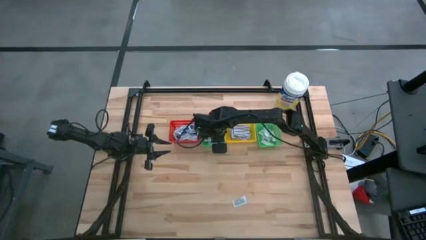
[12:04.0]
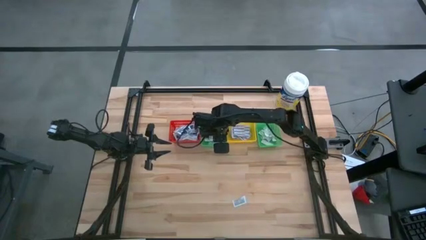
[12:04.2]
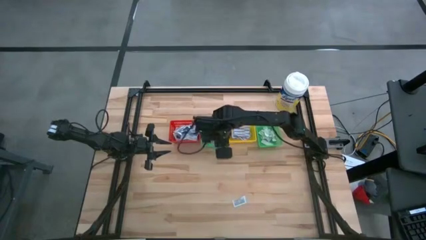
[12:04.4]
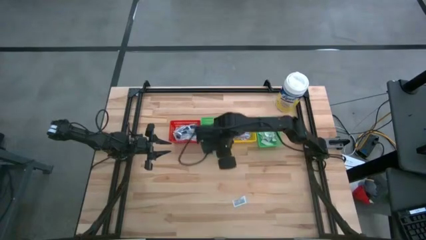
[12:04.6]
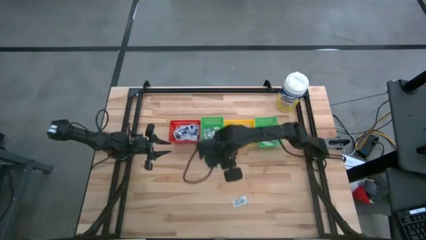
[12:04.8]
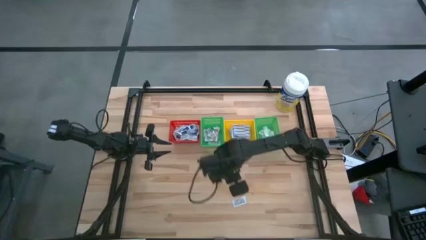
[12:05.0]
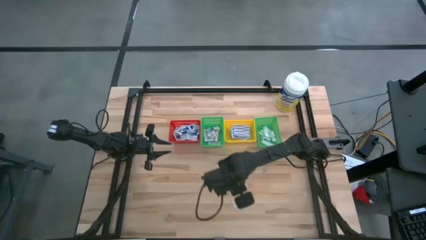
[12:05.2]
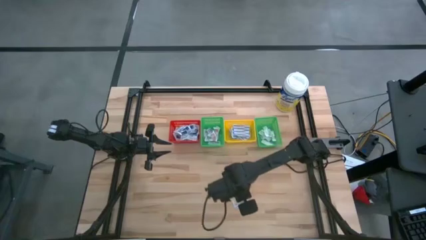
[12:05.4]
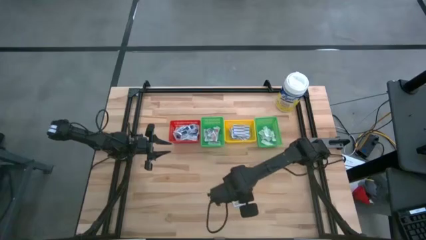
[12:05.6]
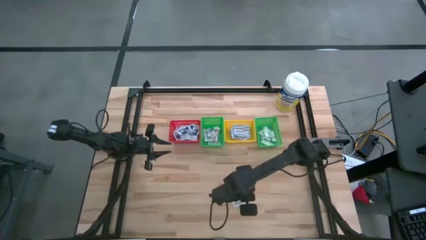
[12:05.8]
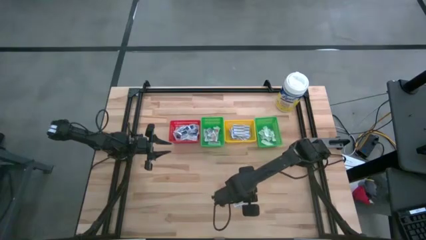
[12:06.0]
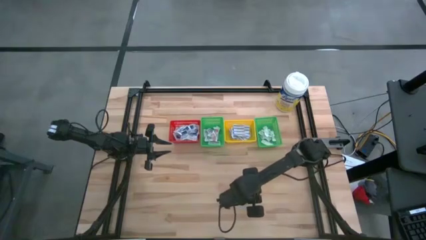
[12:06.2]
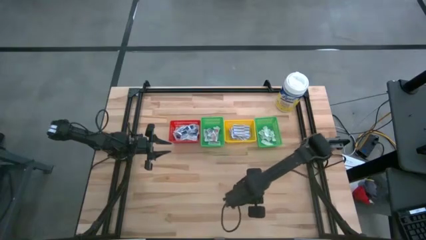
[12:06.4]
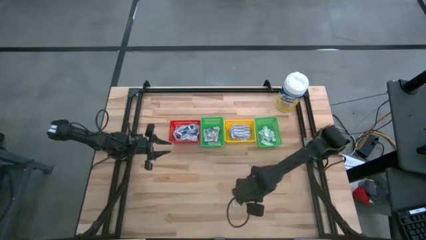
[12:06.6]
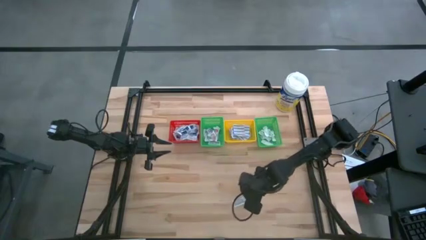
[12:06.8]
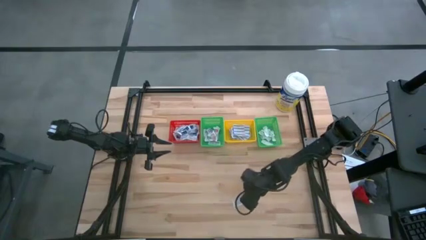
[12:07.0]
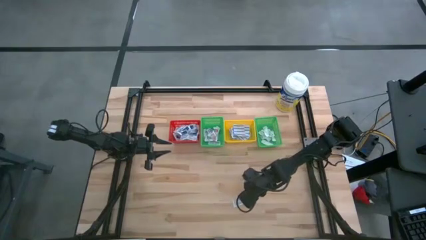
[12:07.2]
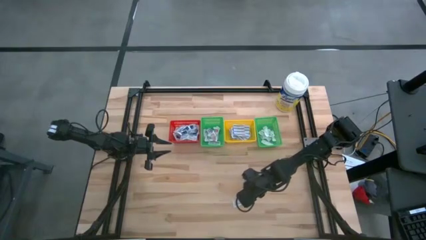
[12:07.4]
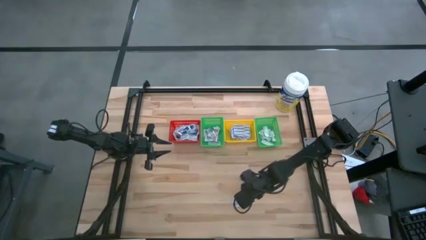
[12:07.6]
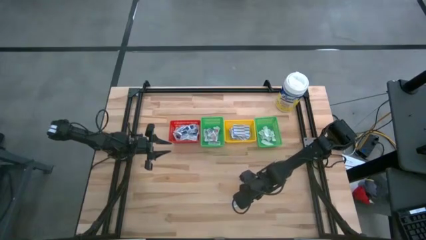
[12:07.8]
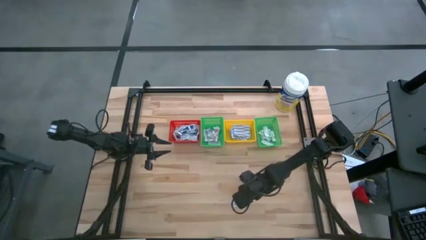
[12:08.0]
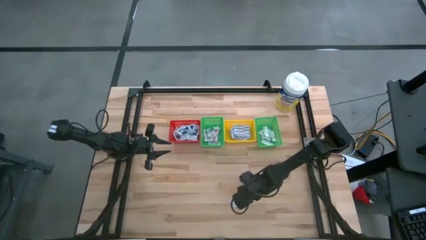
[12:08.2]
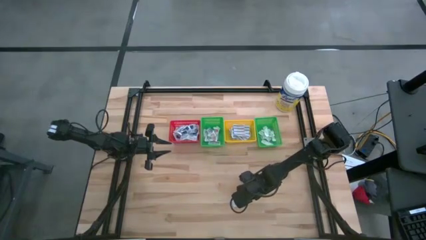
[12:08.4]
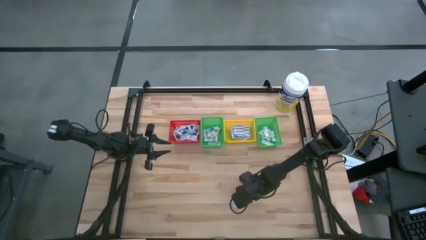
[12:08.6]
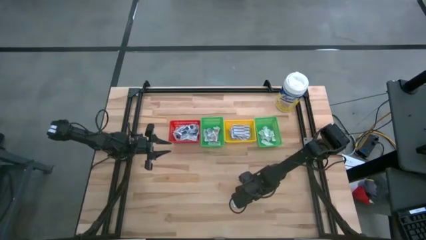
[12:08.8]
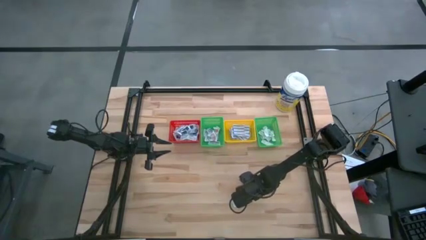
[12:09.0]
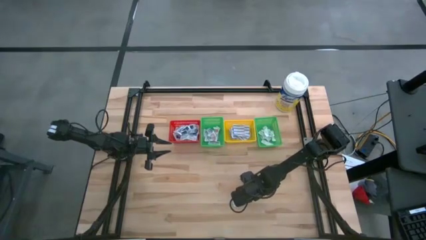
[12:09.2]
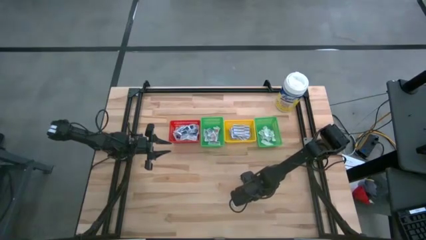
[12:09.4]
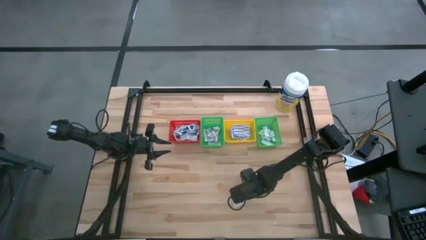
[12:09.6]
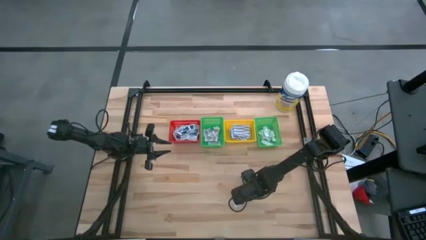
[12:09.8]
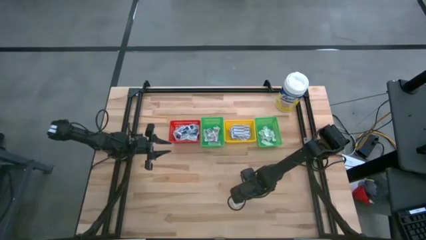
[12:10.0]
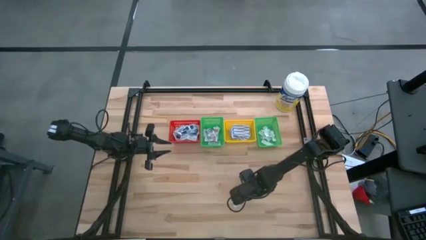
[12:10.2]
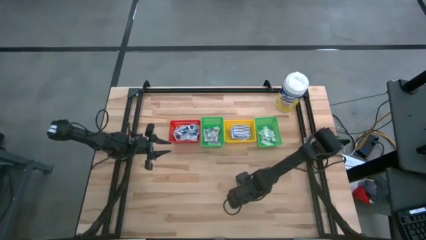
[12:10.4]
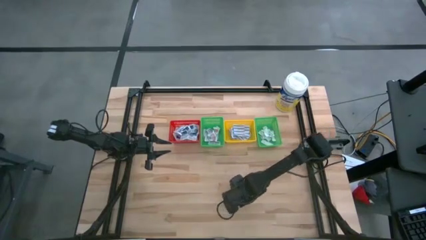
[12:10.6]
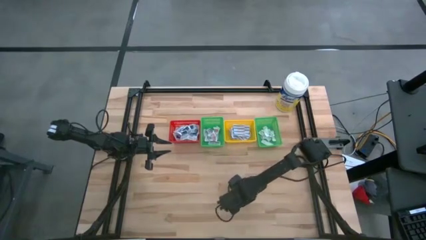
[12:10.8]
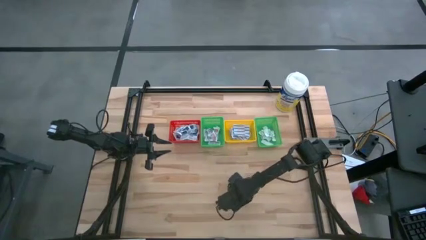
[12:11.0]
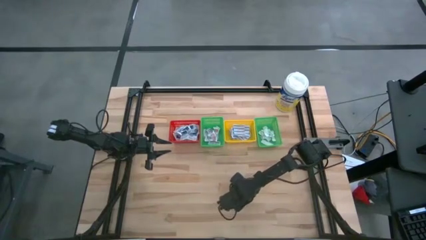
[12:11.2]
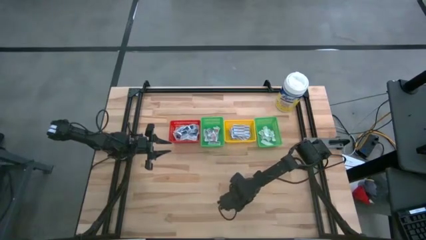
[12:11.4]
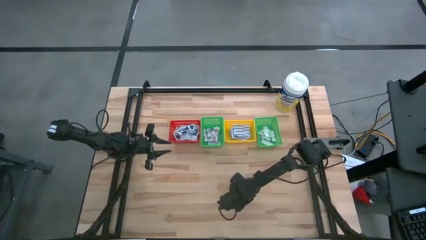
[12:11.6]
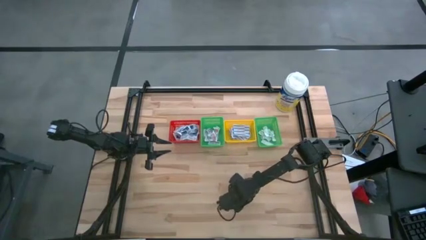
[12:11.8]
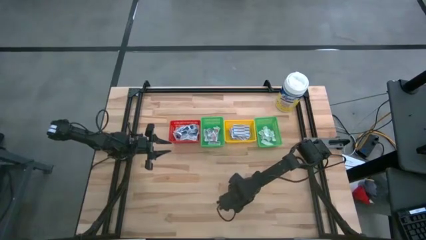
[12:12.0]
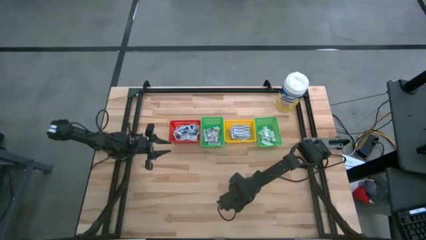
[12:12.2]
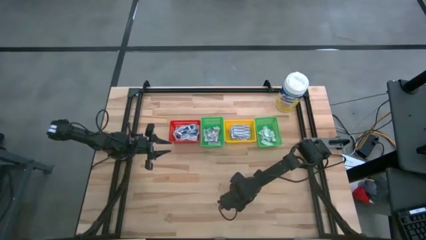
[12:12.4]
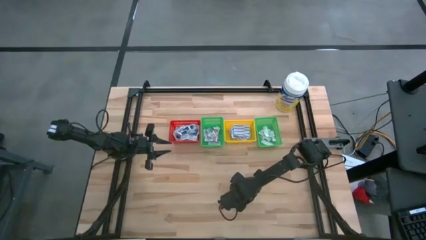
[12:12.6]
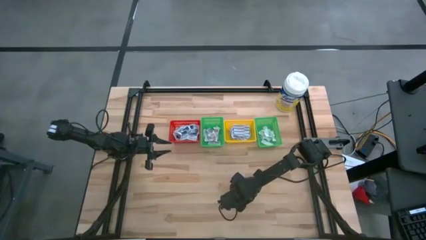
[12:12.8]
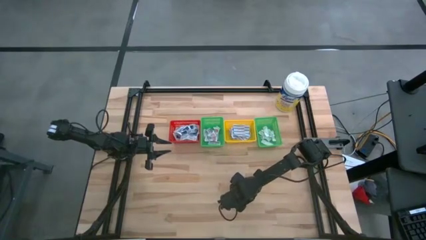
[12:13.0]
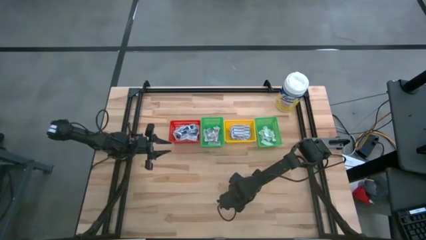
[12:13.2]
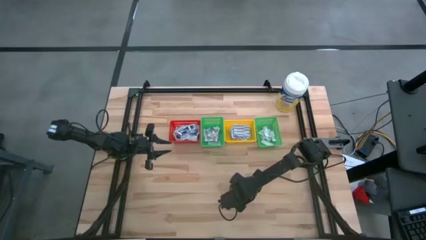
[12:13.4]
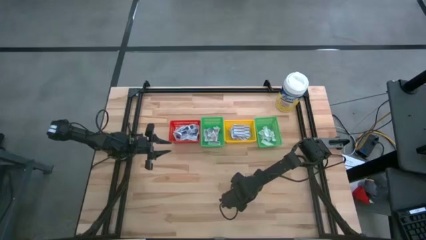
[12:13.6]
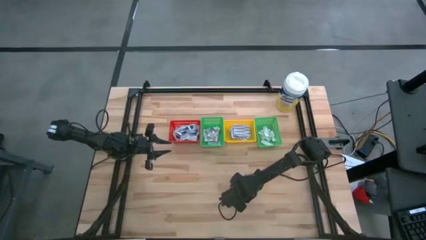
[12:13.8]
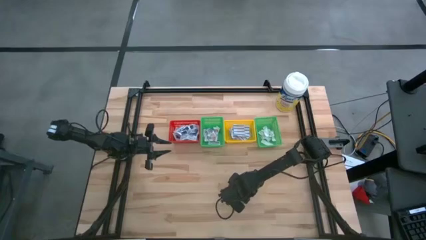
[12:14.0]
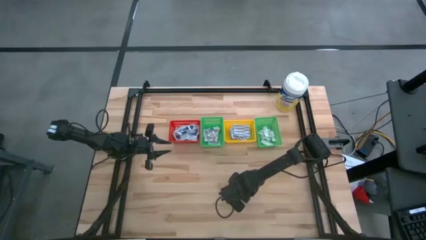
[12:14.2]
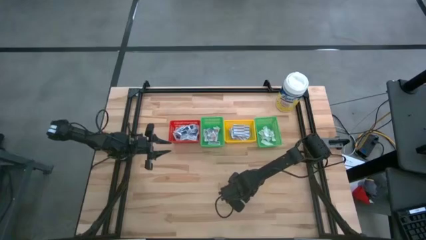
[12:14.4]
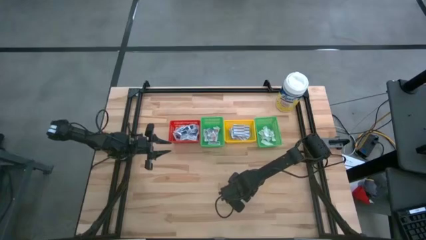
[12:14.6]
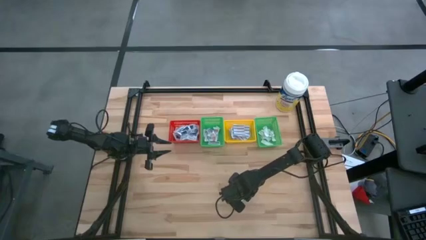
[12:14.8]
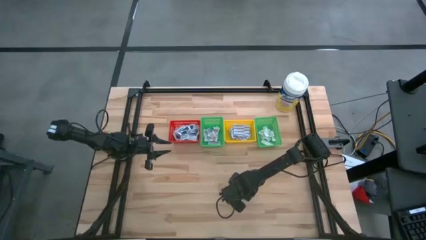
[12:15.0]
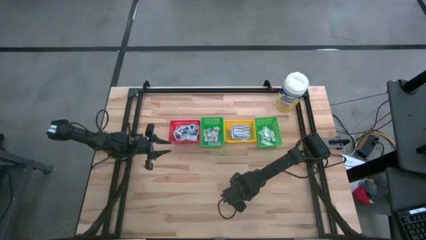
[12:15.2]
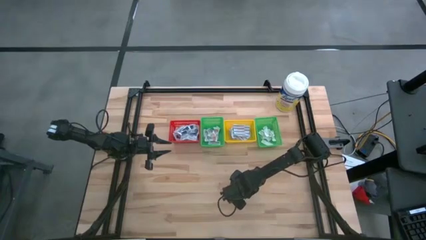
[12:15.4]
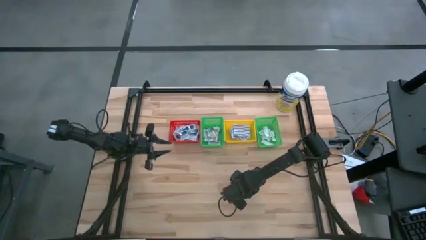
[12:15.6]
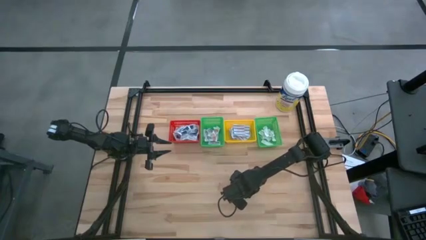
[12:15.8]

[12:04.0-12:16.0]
Task: Pick & Place First Aid Supplies
Put the ointment pack into the left green basket

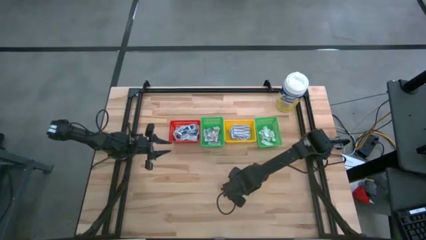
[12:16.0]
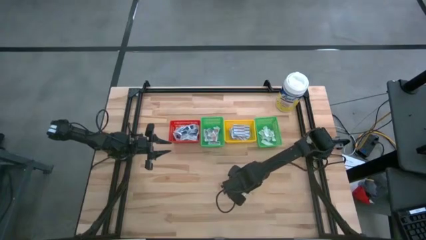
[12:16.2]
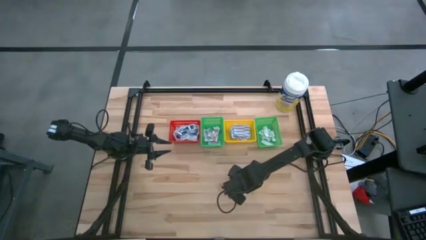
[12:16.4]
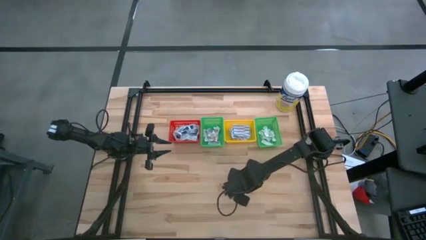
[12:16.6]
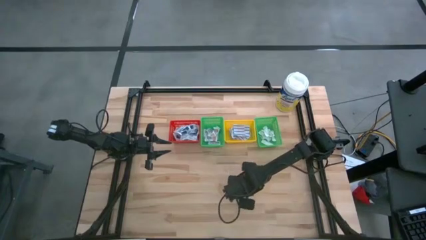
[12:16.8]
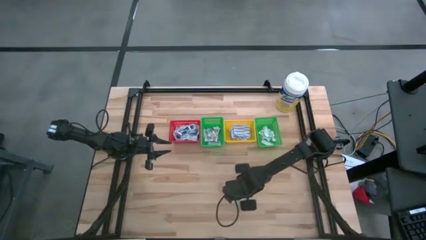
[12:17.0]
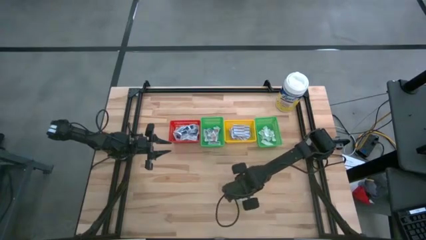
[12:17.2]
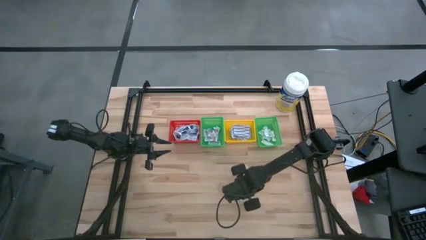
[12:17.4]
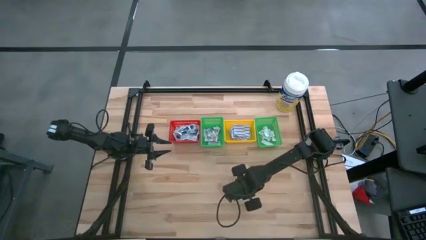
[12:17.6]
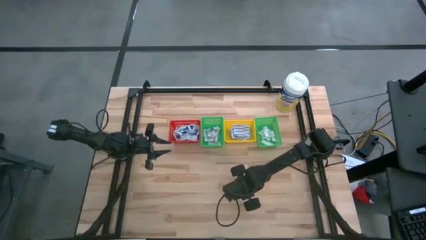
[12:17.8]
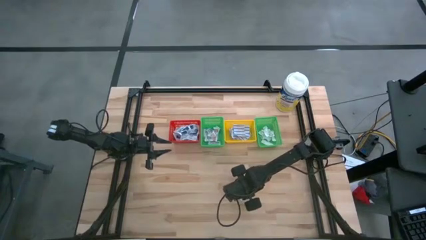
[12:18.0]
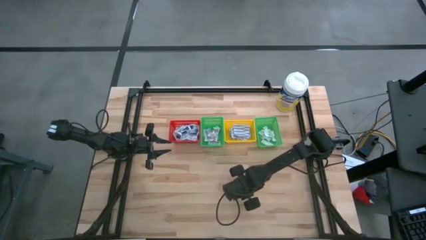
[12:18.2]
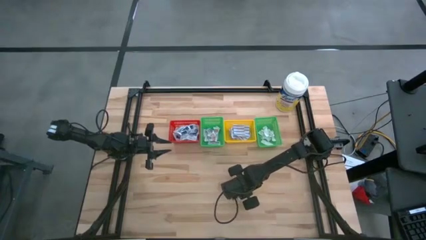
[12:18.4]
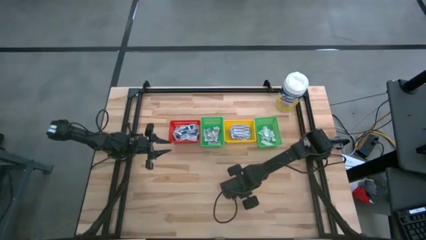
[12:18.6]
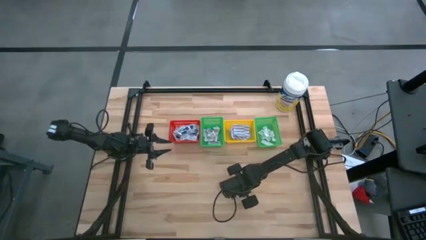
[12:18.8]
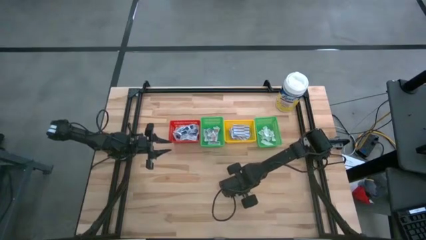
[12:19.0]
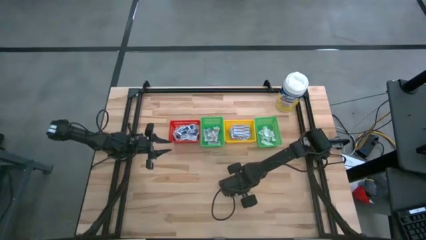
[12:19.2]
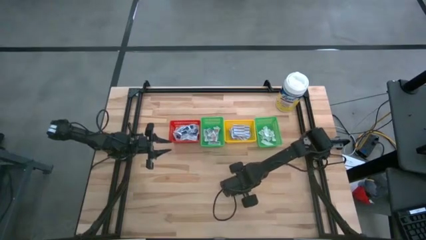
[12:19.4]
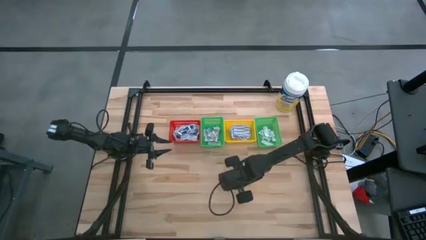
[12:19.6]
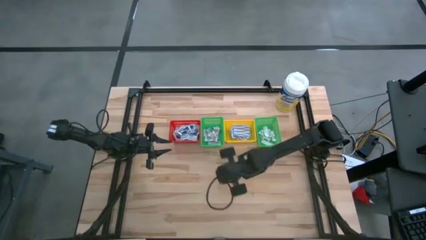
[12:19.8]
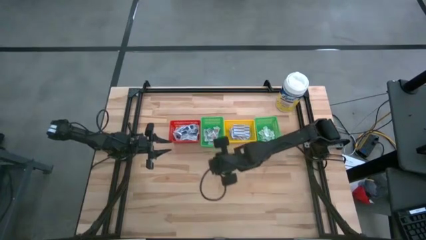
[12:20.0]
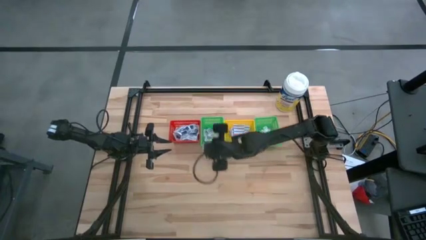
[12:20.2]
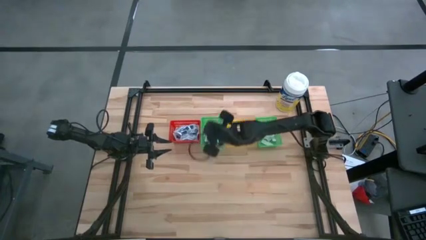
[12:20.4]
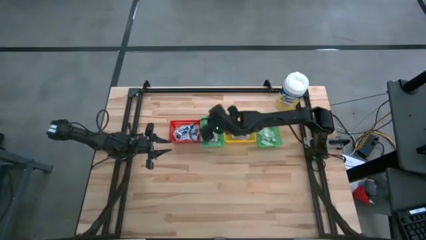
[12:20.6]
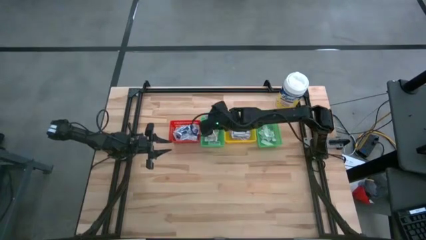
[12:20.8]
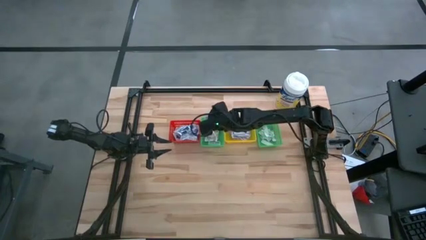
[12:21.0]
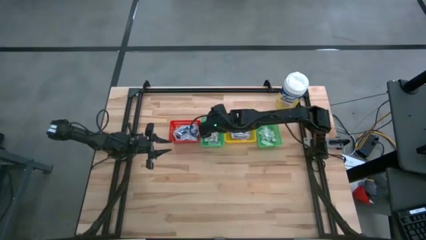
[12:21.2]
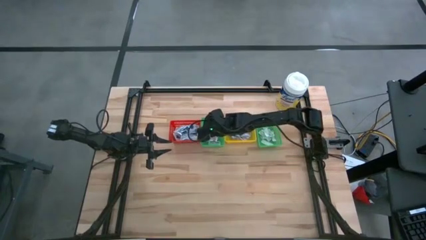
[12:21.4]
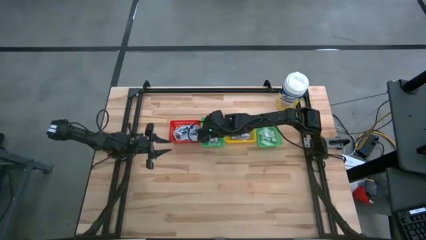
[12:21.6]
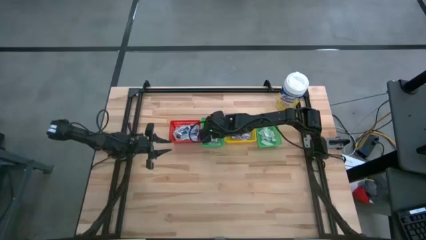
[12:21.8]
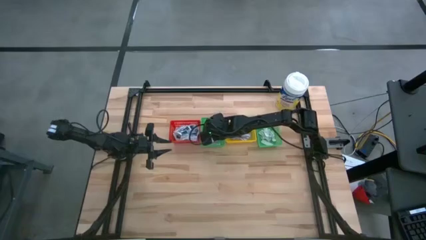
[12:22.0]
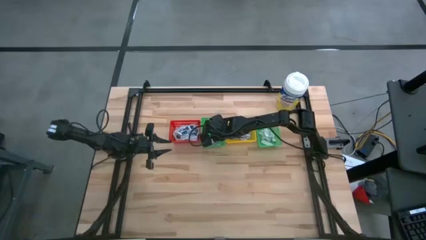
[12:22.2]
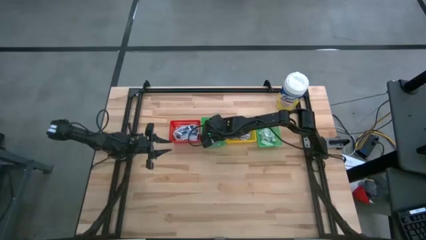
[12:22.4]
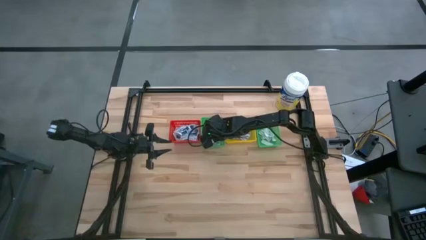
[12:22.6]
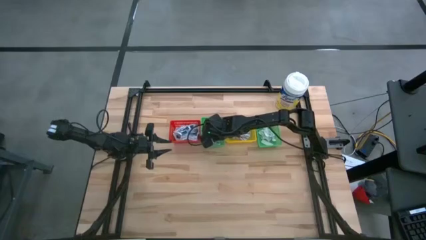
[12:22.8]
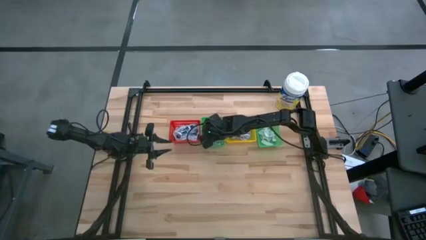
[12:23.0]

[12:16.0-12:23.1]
Put the ointment pack into the left green basket
